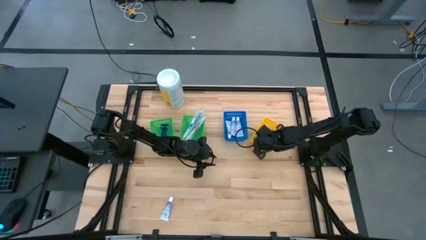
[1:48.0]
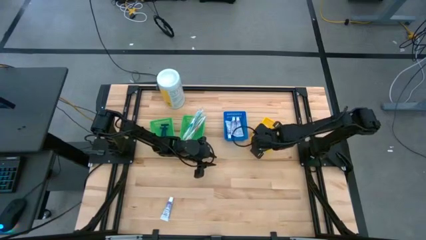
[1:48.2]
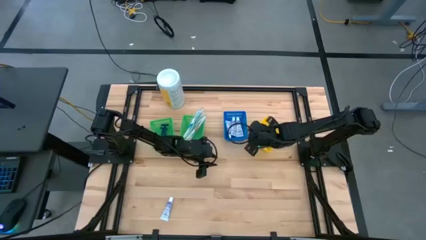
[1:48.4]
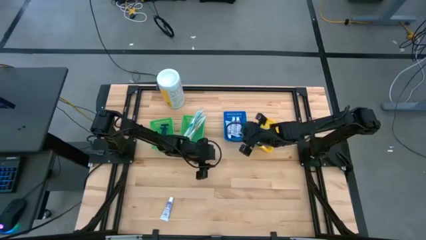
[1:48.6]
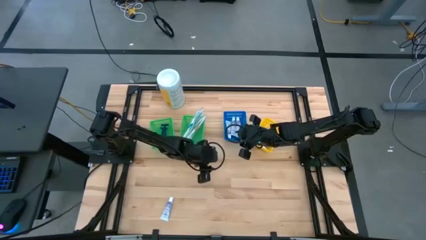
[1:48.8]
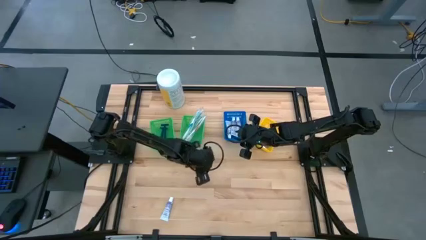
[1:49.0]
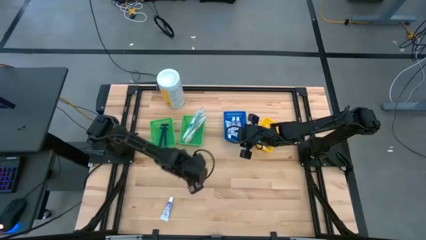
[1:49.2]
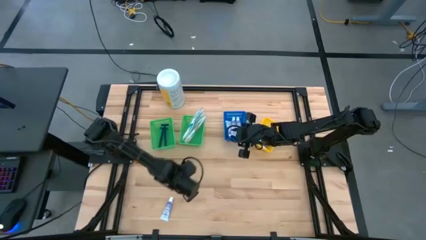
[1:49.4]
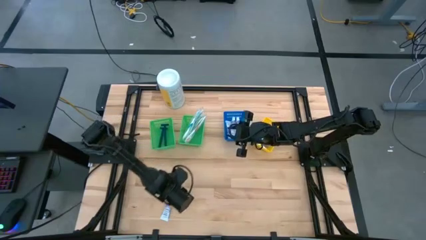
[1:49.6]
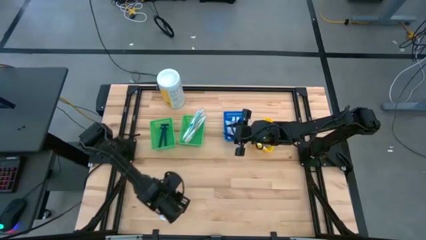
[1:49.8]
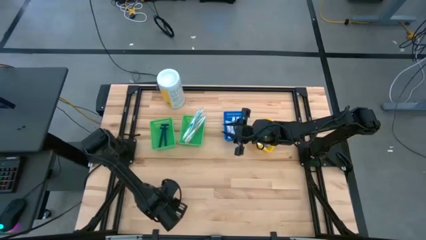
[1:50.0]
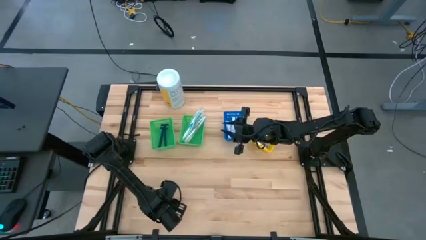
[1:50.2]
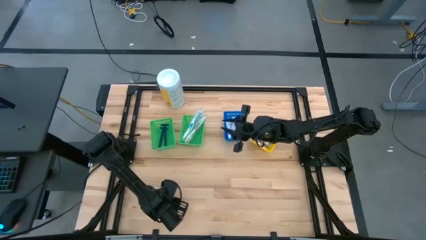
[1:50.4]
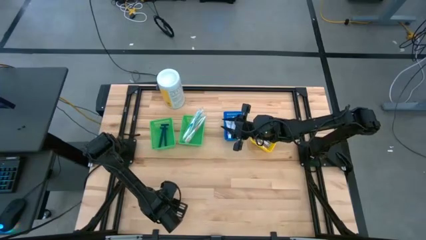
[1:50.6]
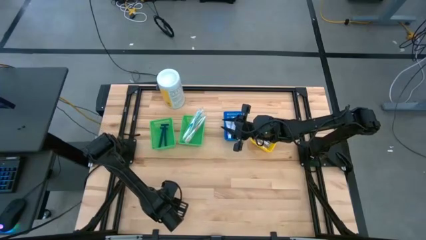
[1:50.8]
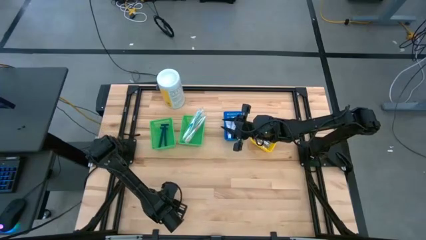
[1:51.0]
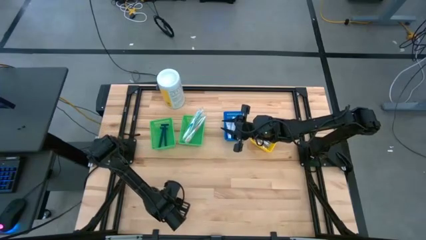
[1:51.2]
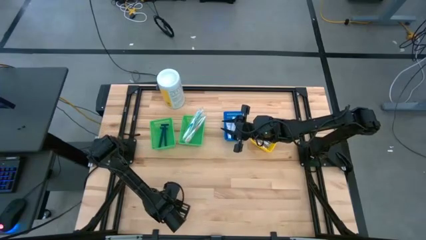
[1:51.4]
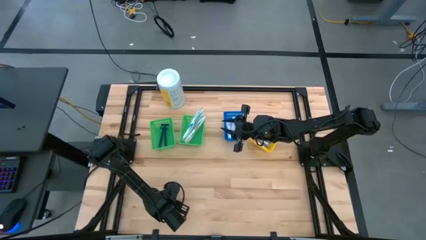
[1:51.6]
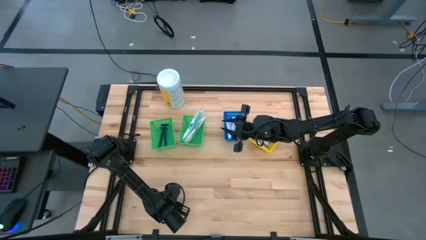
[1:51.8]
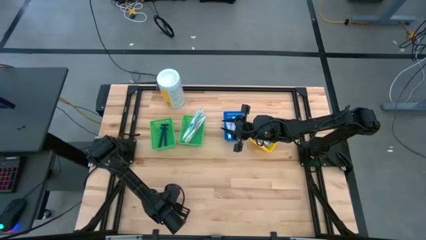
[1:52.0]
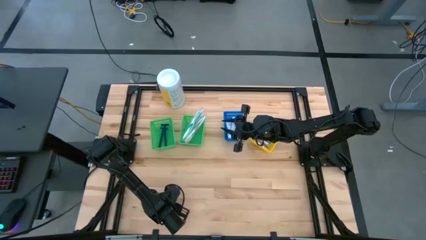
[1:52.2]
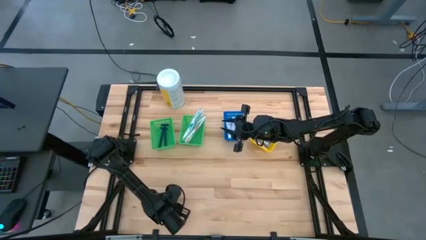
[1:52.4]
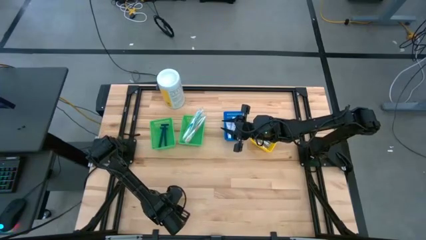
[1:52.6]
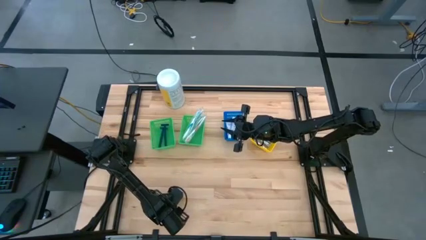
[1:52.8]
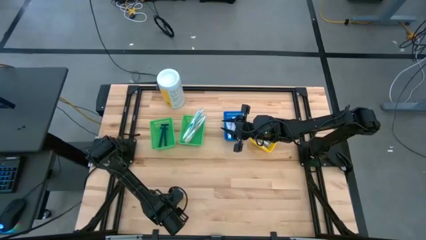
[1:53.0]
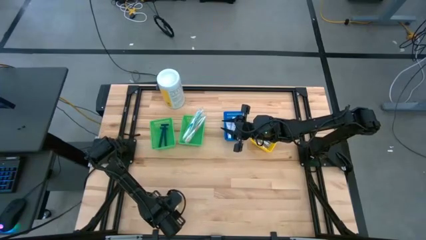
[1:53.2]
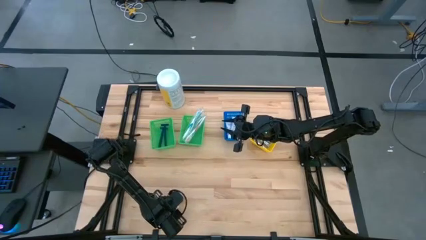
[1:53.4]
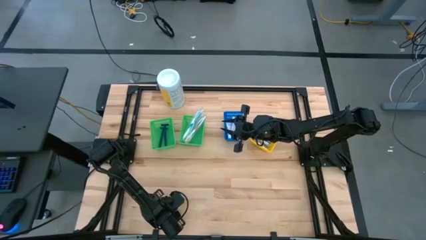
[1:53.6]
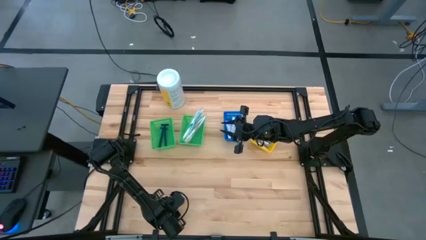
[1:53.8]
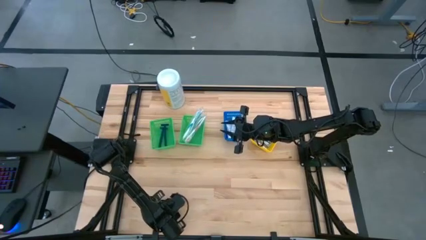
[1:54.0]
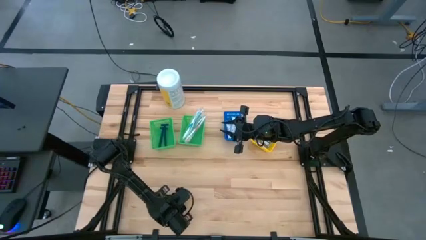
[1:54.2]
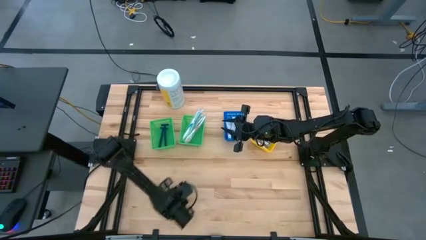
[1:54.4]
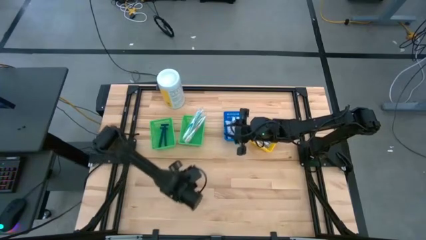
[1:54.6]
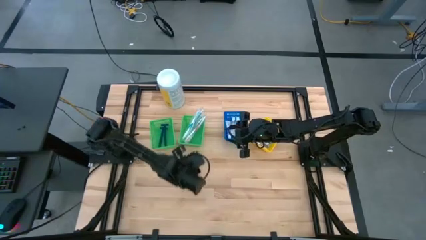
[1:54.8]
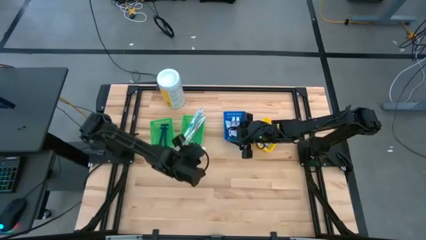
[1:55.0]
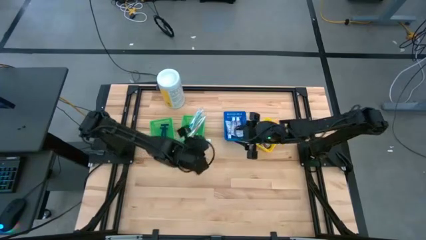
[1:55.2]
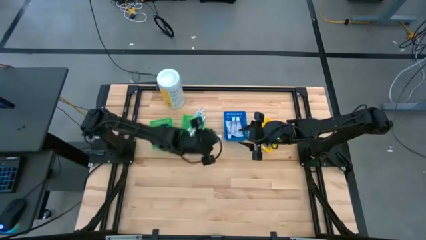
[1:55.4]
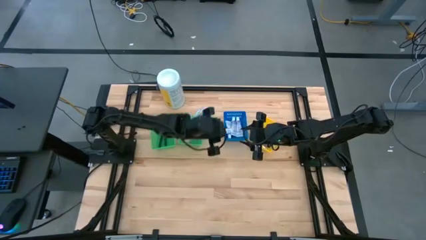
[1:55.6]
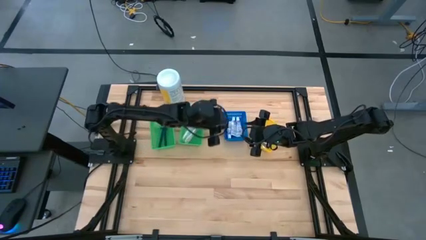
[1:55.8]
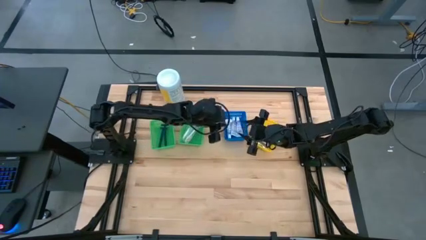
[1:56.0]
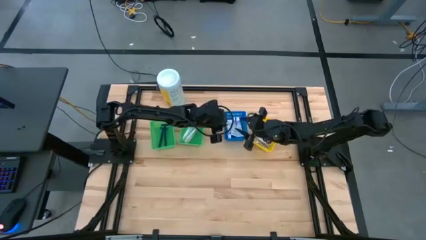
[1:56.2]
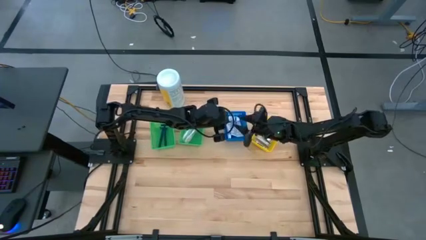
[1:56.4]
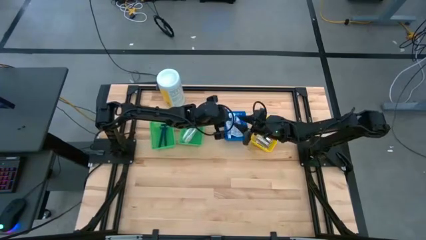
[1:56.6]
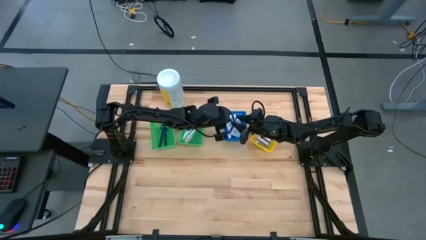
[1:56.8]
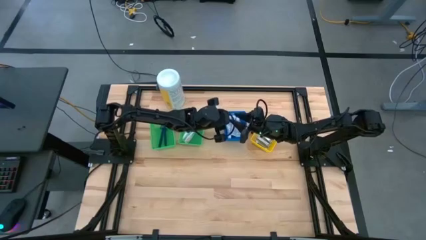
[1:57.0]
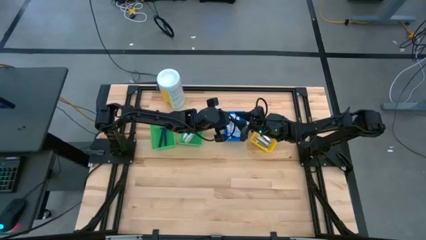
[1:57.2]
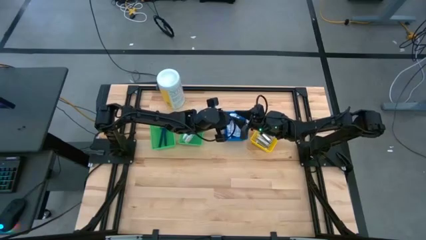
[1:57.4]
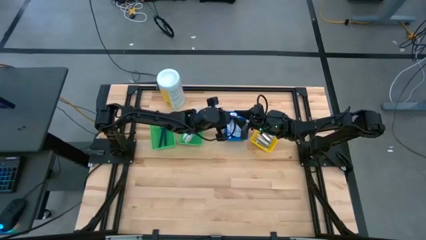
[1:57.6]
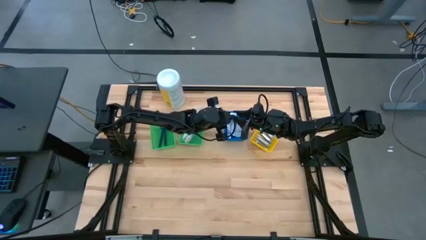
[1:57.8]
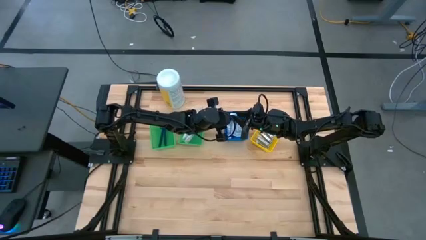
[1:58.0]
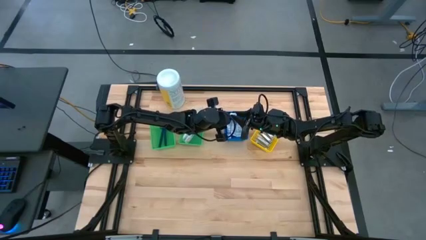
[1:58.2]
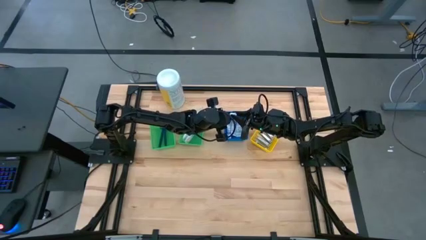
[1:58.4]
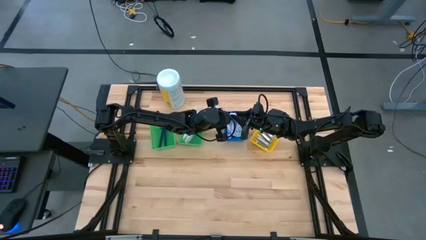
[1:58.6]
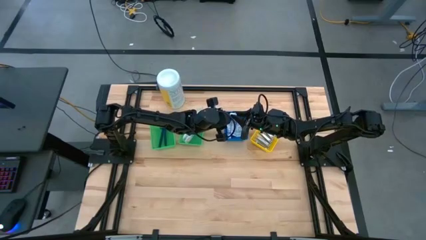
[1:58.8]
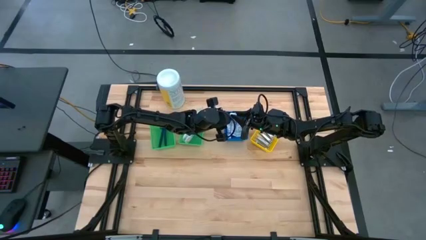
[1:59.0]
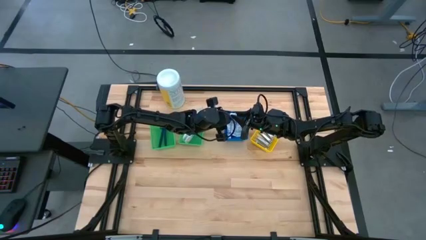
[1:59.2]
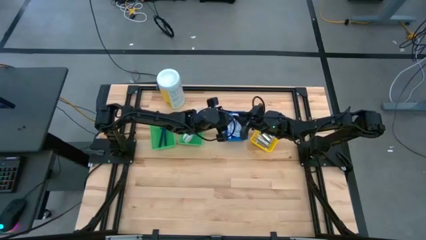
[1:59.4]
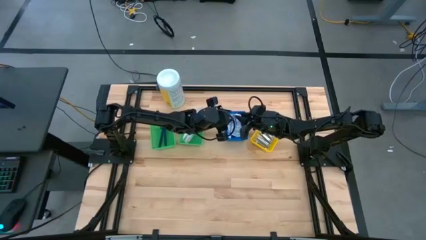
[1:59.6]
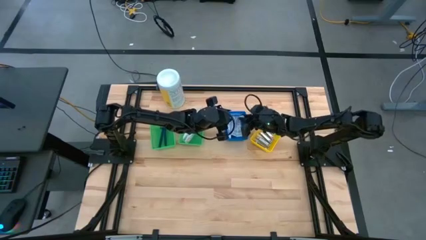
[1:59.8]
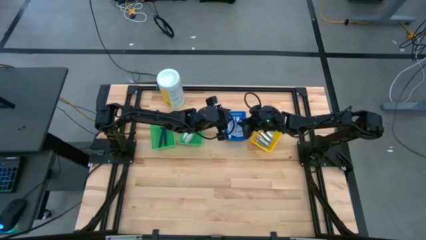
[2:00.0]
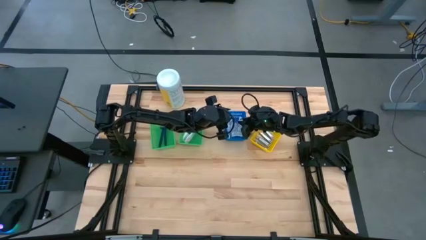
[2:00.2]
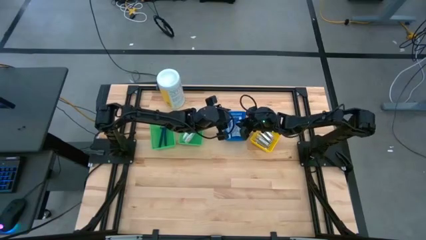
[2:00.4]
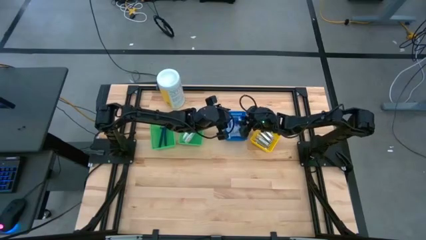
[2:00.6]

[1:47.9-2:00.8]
Task: Pick & Place Travel size toiletries
Put the purple toothpaste into the blue bin
